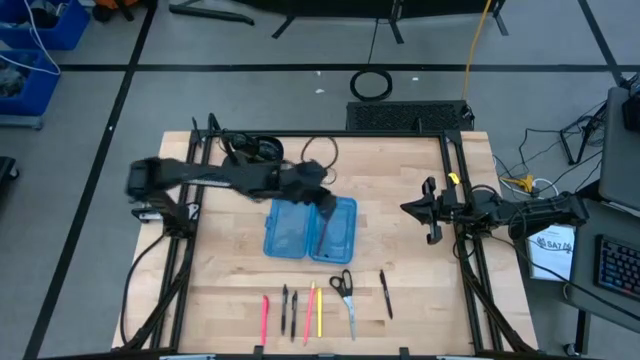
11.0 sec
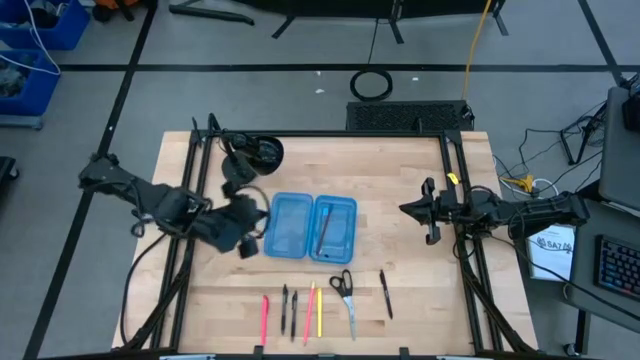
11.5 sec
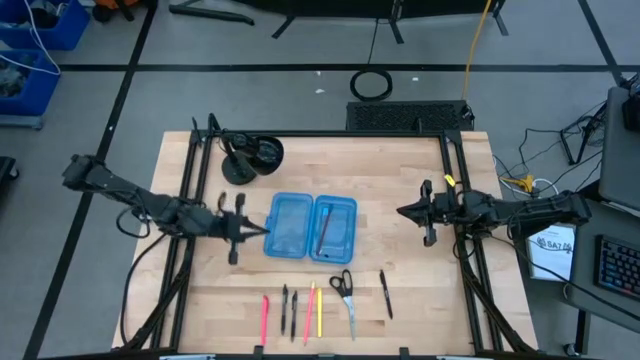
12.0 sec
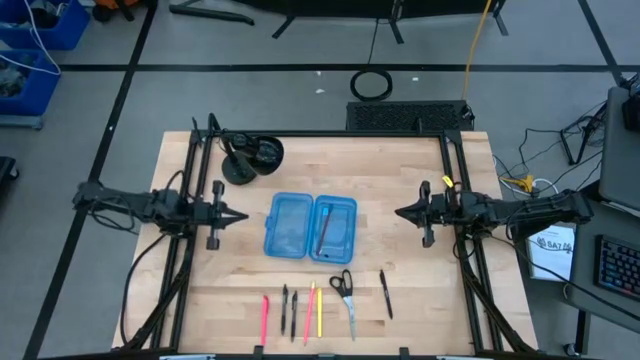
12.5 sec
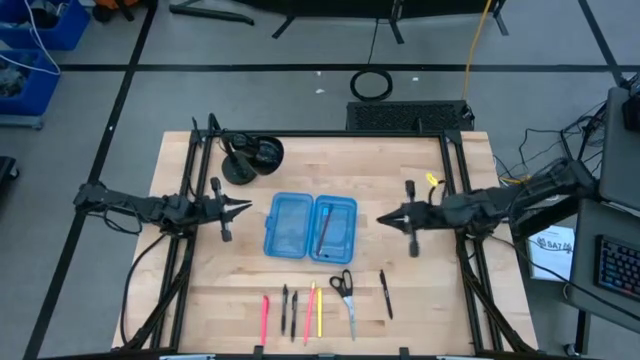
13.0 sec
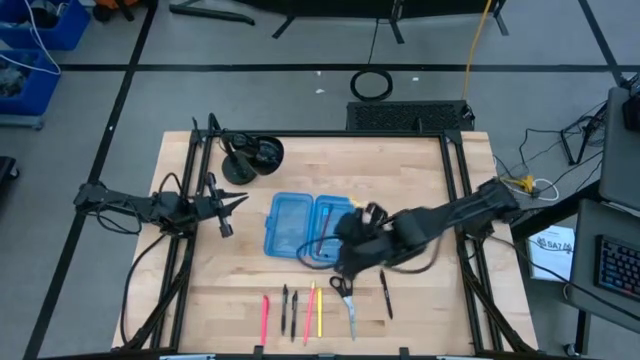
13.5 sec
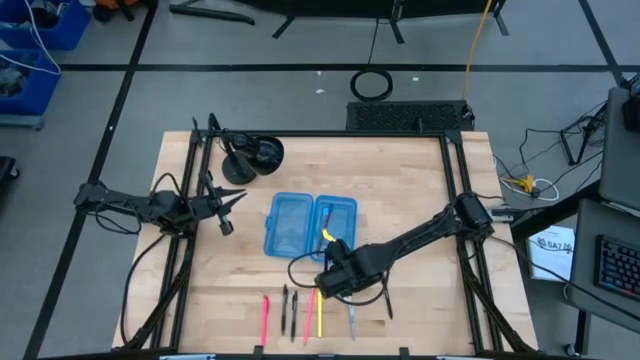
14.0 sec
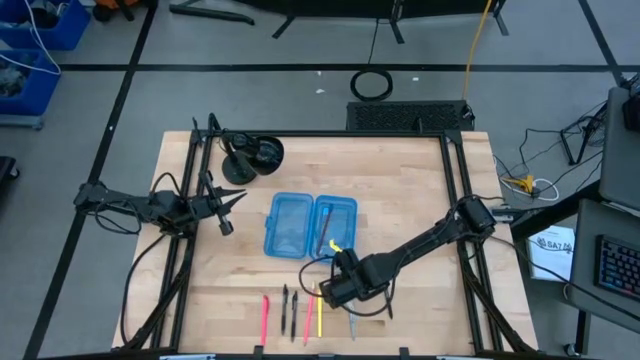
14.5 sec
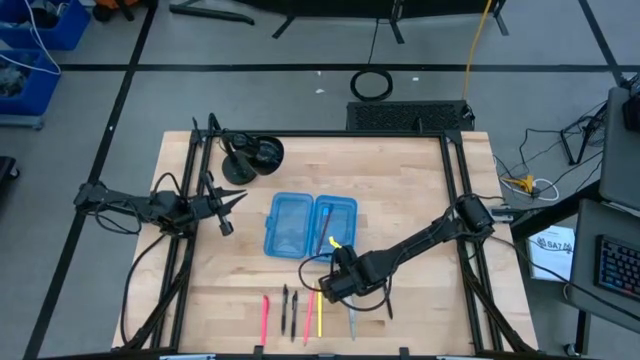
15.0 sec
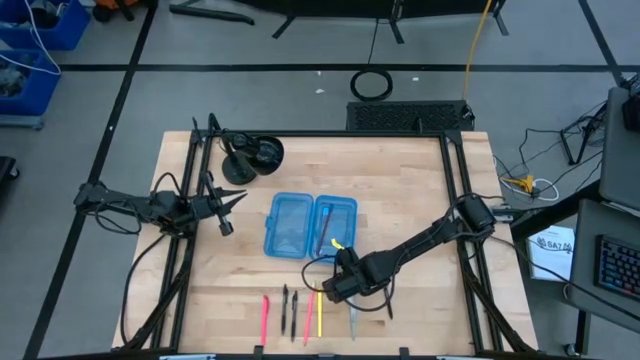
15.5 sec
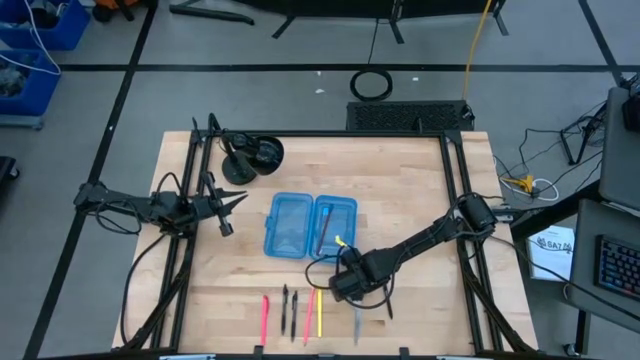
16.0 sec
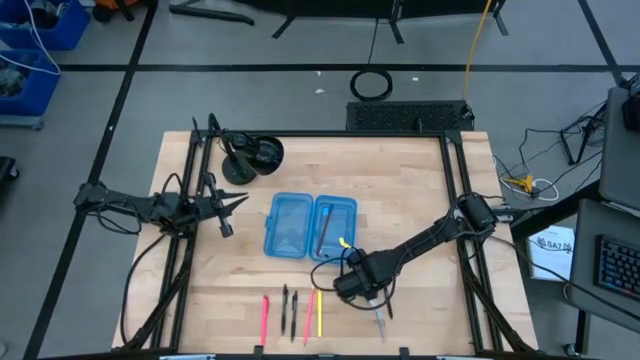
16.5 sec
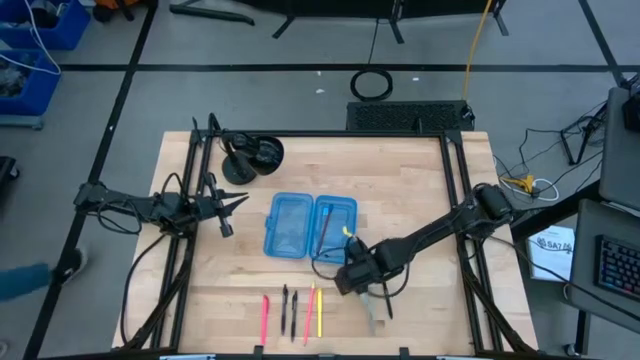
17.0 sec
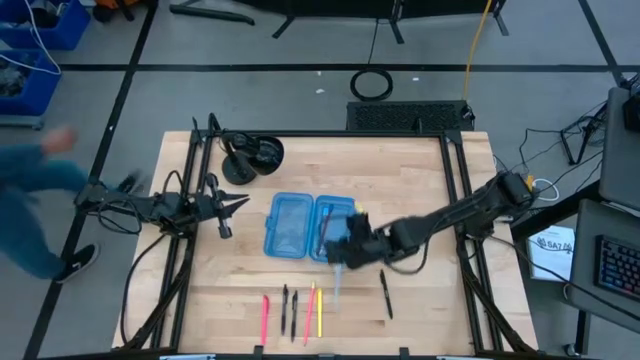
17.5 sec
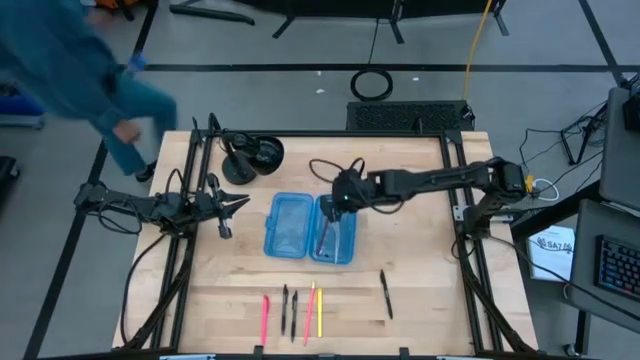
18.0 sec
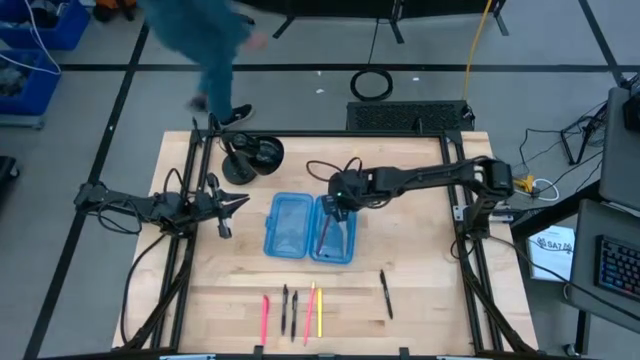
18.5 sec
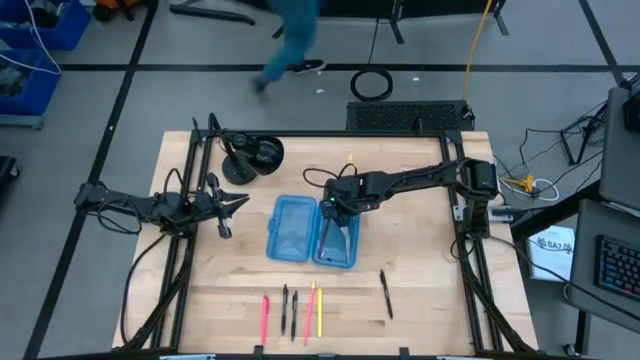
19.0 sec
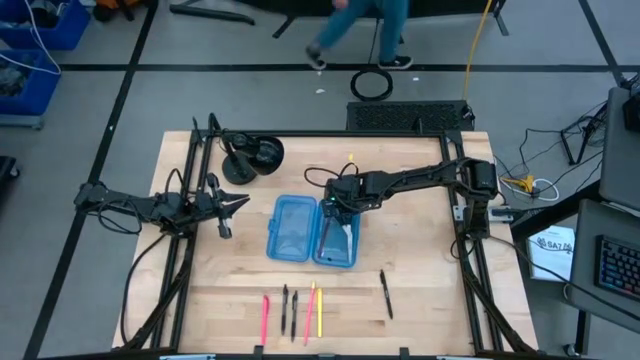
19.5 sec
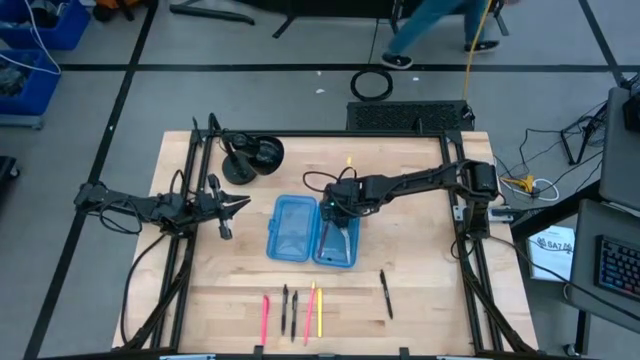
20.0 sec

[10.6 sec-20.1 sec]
Task: Pick & place school supplies into a supply box
Put the black scissors into the blue box

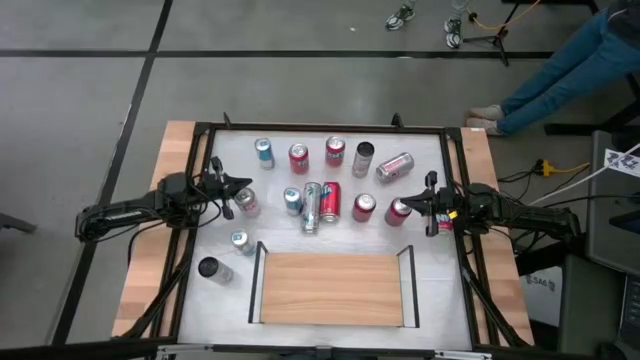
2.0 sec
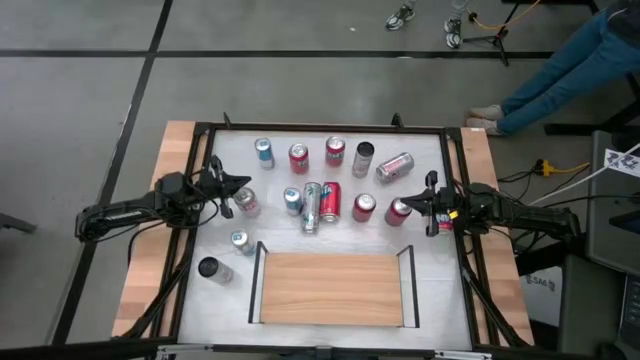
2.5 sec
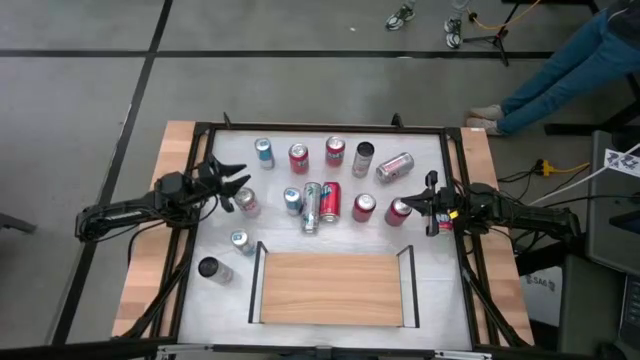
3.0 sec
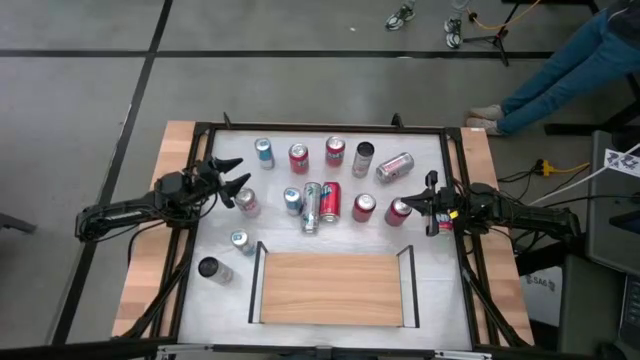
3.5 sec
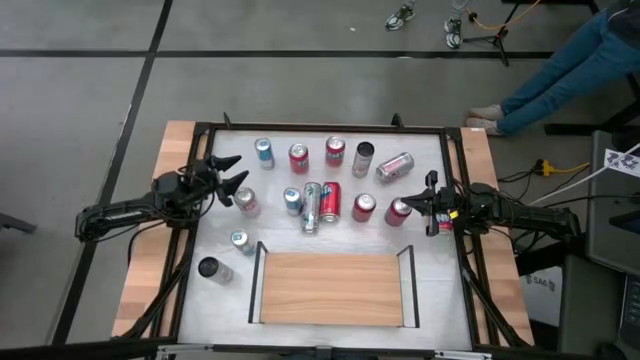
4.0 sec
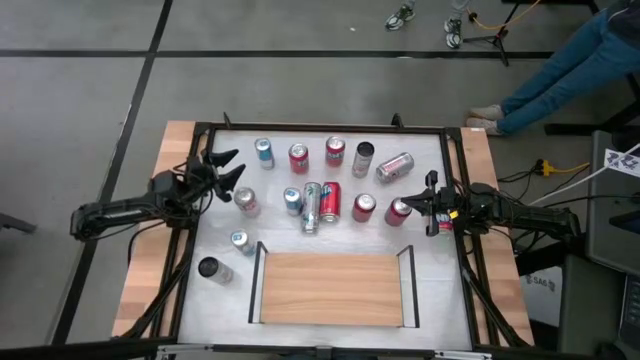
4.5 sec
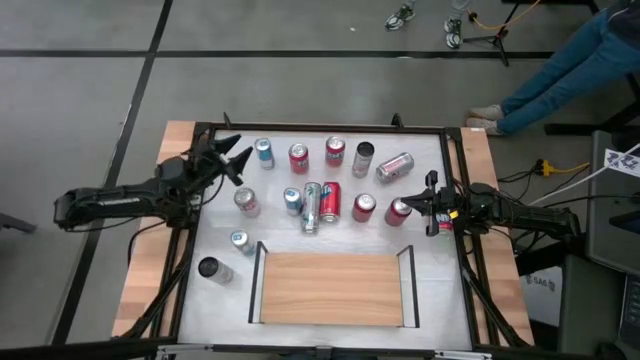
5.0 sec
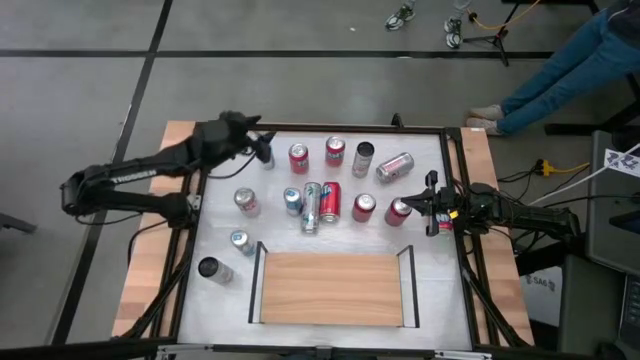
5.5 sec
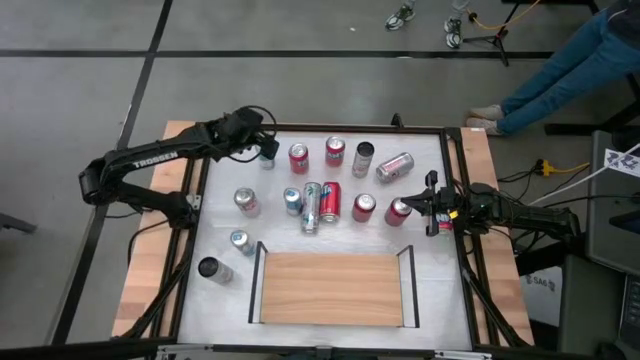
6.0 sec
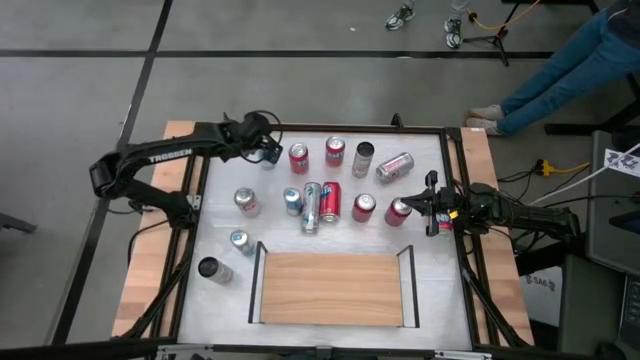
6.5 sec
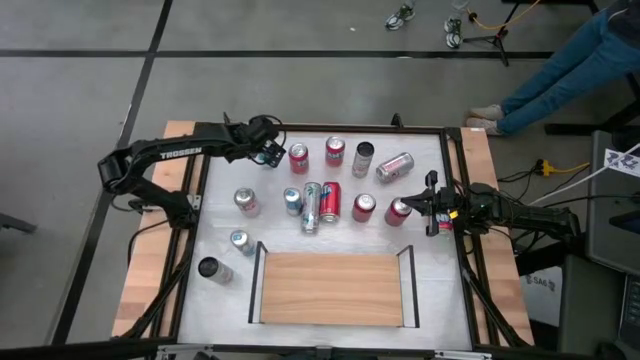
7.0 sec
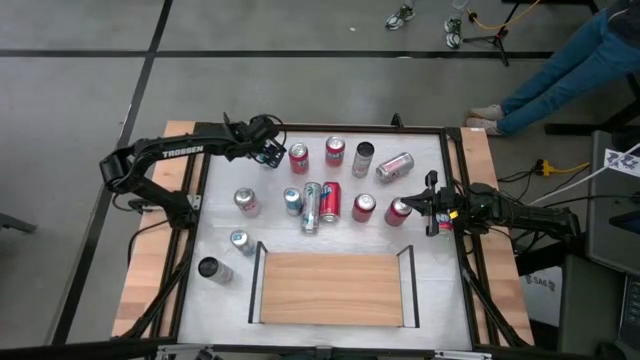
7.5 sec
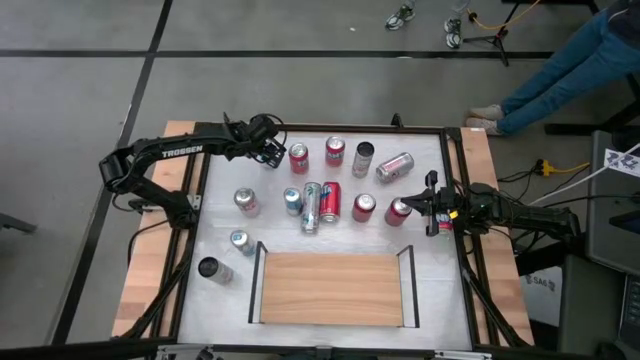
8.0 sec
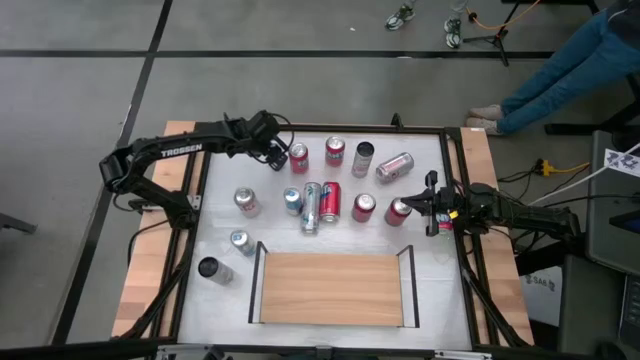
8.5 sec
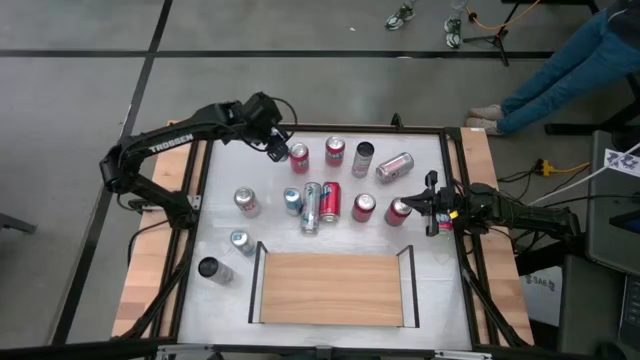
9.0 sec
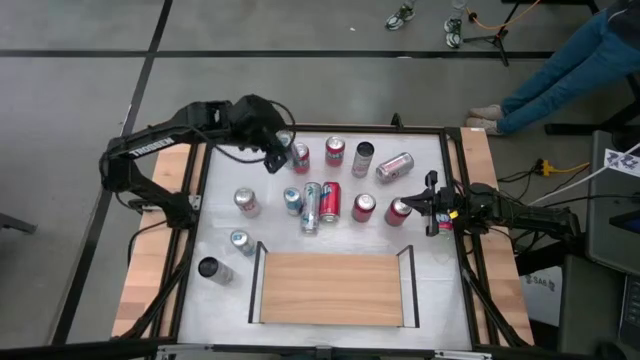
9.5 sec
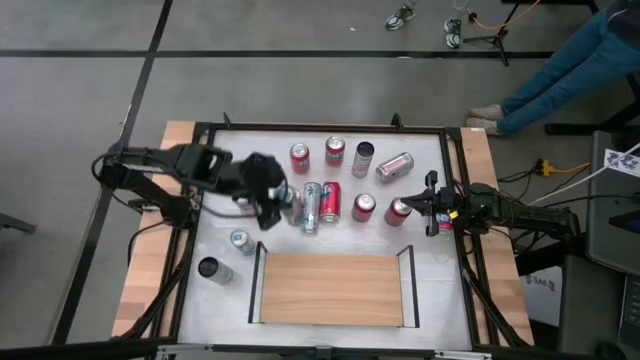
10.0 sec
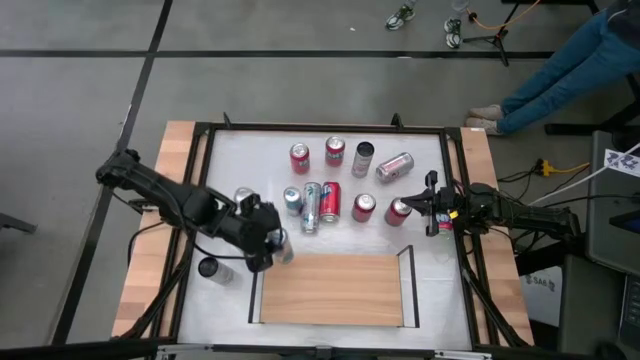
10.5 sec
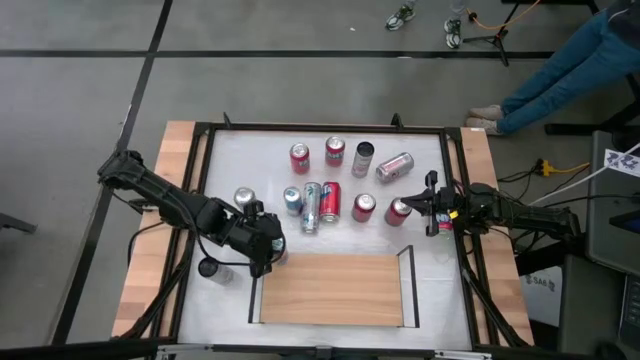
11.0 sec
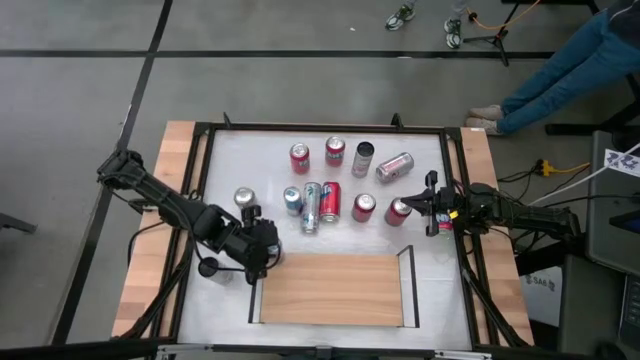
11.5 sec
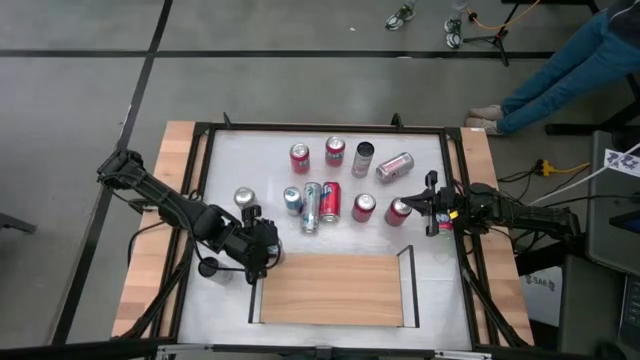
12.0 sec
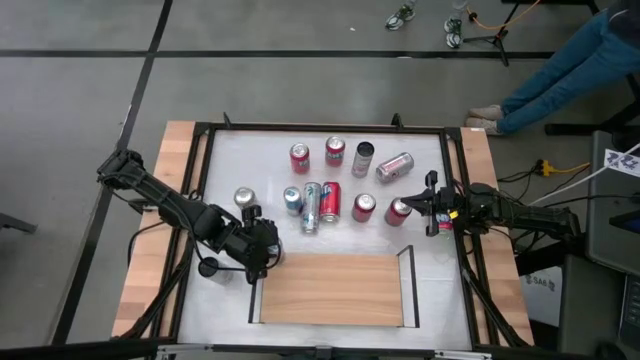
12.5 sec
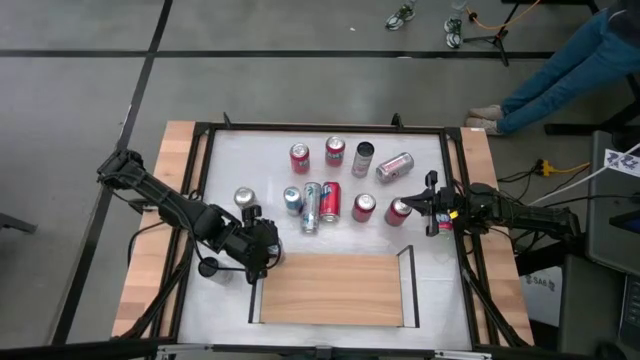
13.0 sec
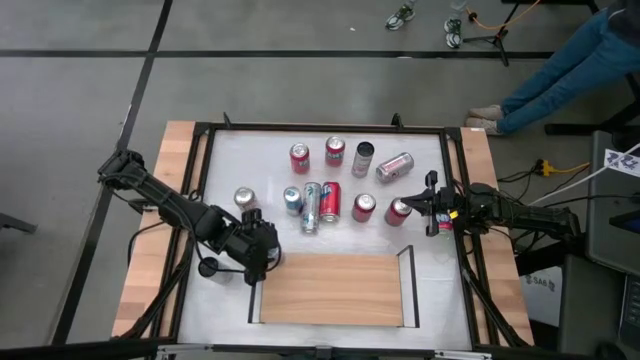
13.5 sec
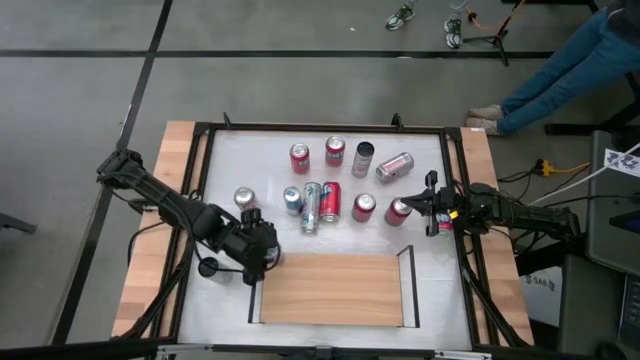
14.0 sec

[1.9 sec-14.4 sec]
Task: Place canned beverage on shelf
Put the top blue soda can on the shelf
